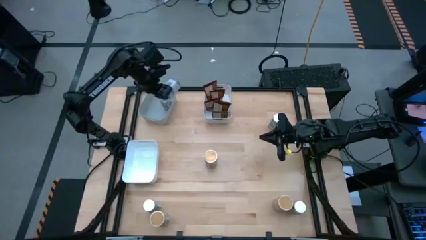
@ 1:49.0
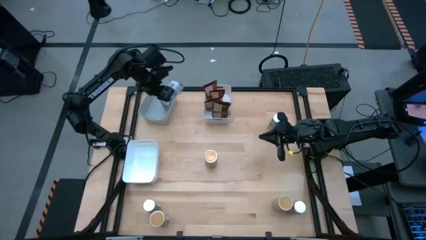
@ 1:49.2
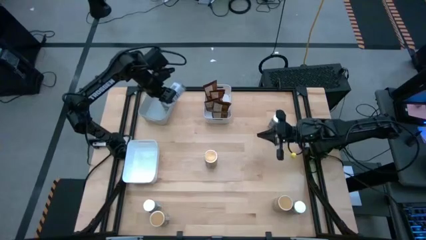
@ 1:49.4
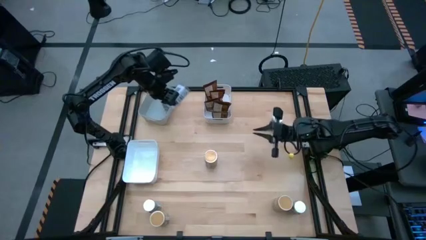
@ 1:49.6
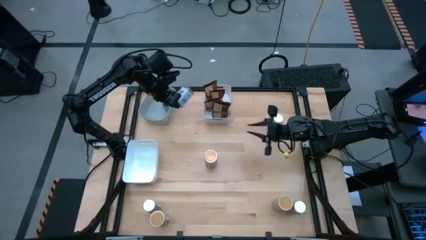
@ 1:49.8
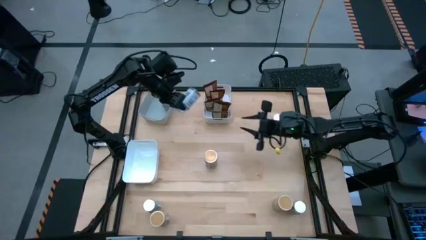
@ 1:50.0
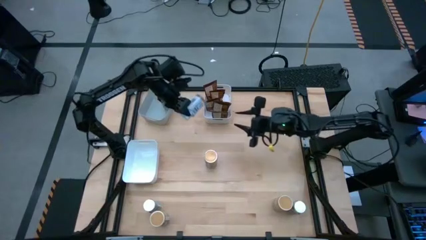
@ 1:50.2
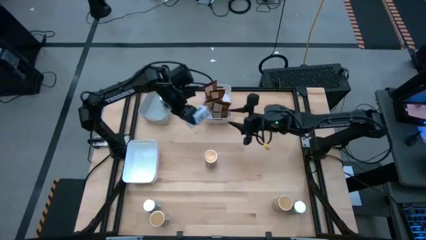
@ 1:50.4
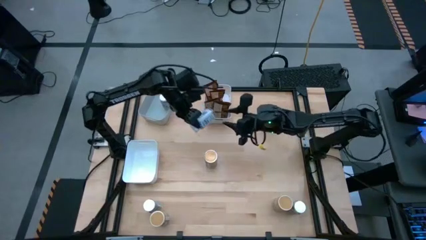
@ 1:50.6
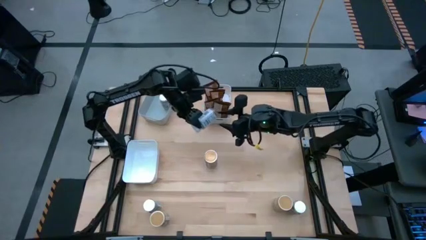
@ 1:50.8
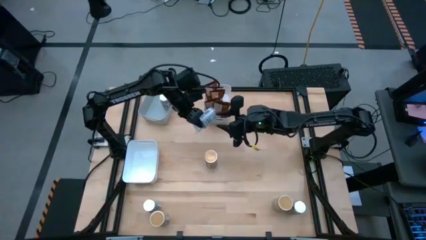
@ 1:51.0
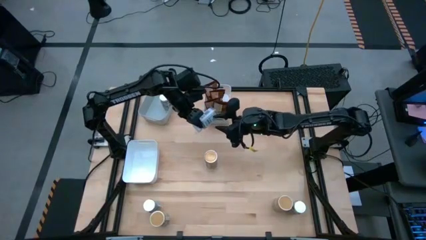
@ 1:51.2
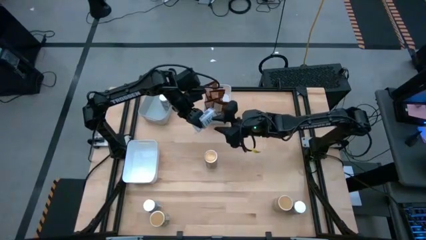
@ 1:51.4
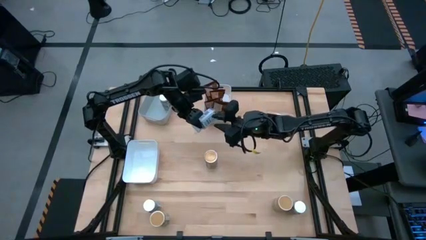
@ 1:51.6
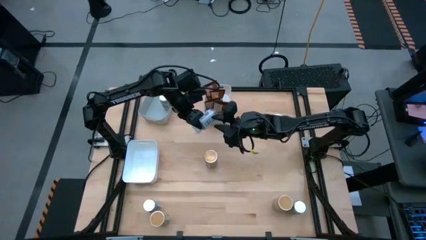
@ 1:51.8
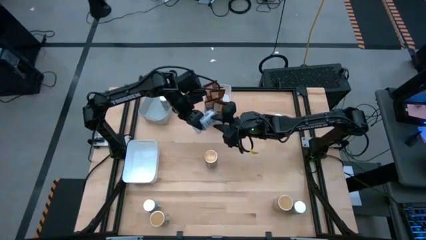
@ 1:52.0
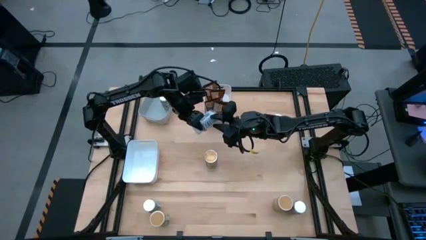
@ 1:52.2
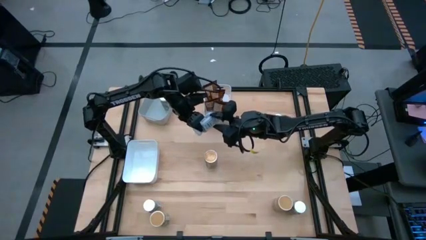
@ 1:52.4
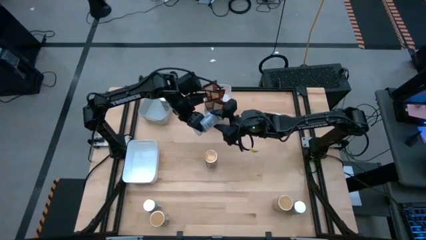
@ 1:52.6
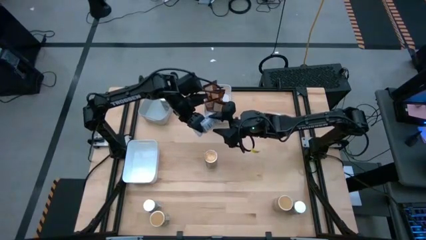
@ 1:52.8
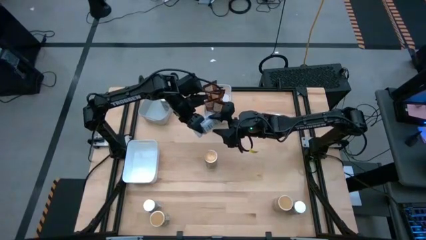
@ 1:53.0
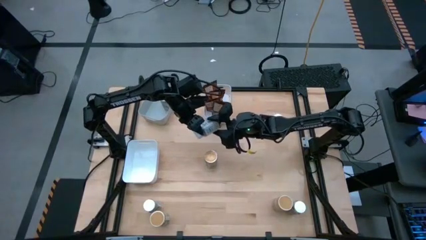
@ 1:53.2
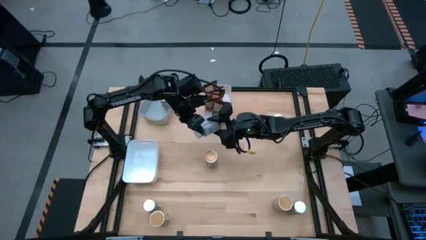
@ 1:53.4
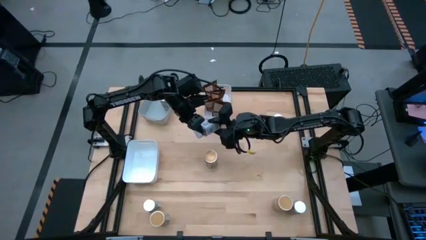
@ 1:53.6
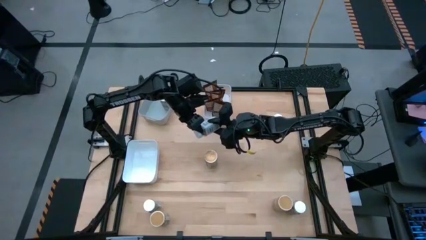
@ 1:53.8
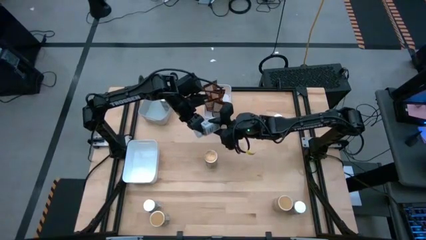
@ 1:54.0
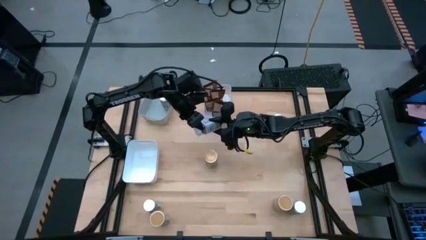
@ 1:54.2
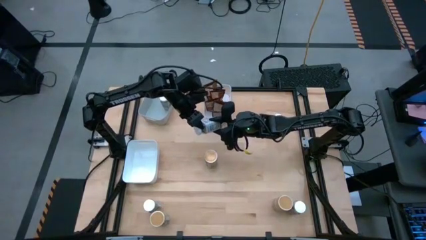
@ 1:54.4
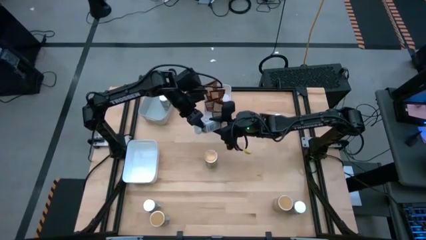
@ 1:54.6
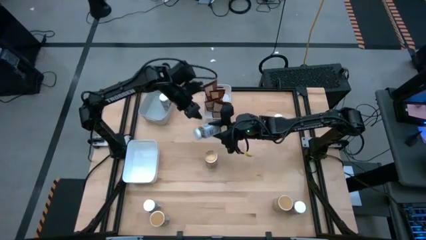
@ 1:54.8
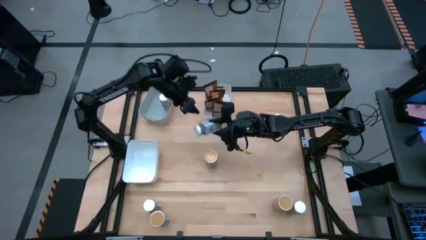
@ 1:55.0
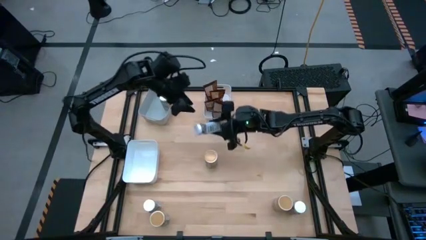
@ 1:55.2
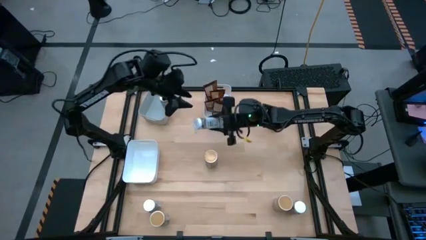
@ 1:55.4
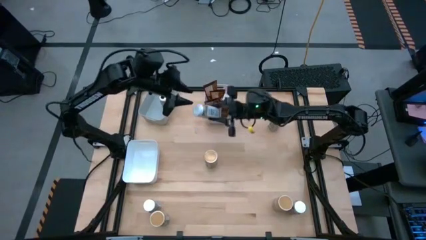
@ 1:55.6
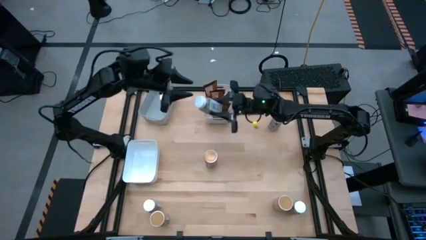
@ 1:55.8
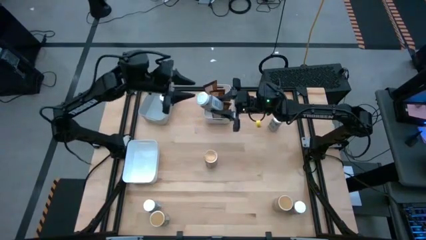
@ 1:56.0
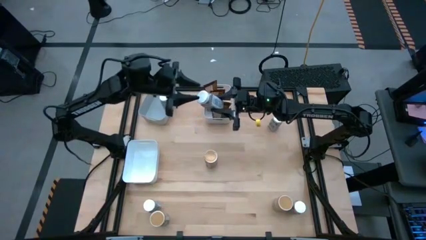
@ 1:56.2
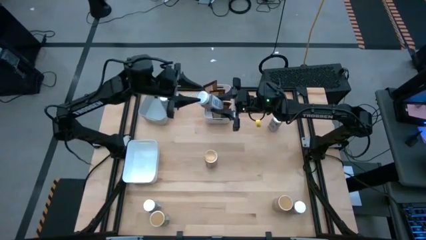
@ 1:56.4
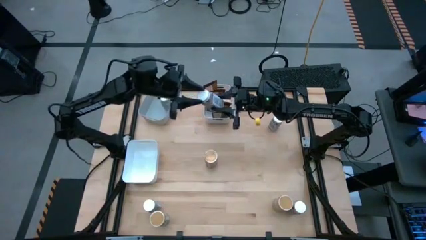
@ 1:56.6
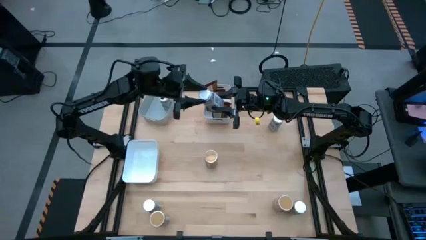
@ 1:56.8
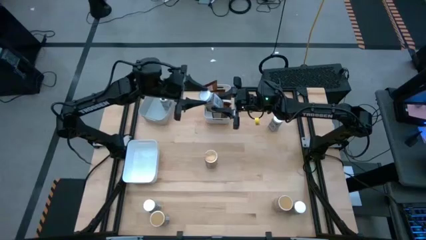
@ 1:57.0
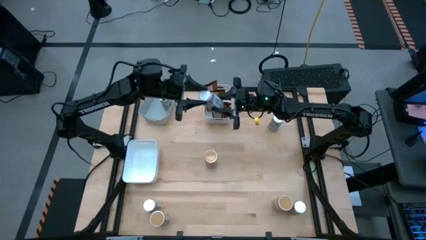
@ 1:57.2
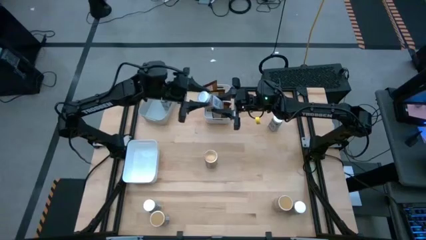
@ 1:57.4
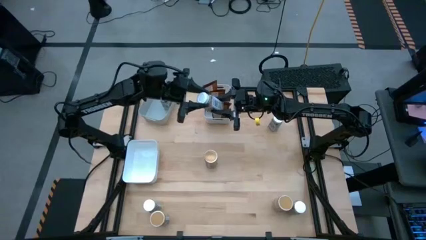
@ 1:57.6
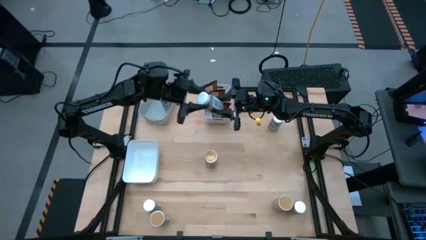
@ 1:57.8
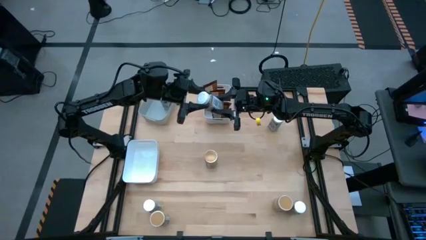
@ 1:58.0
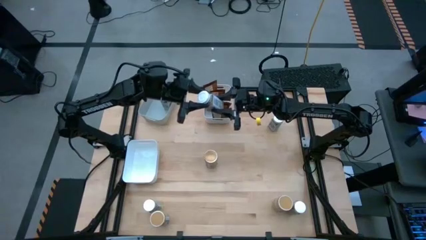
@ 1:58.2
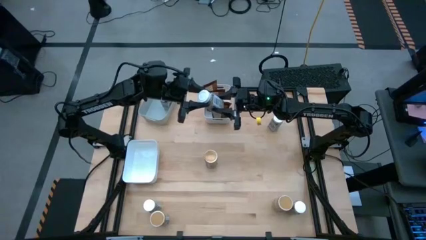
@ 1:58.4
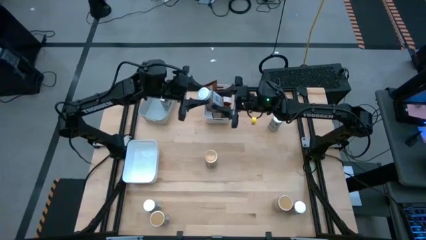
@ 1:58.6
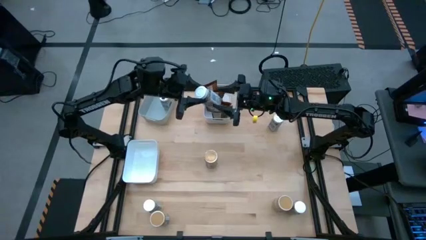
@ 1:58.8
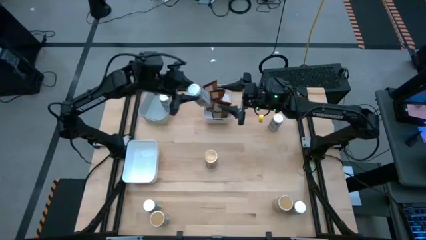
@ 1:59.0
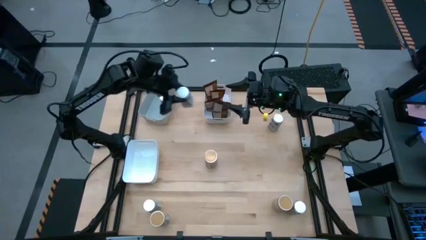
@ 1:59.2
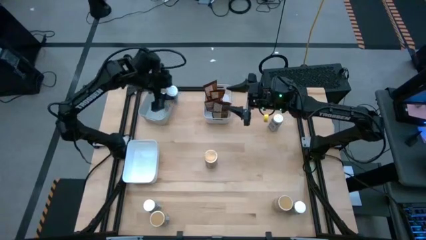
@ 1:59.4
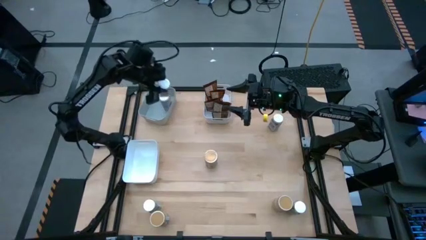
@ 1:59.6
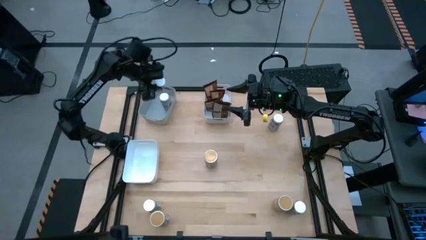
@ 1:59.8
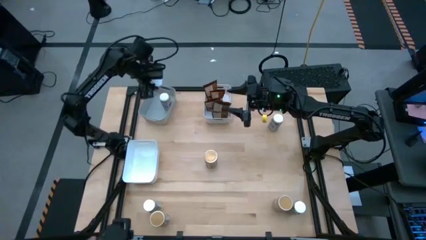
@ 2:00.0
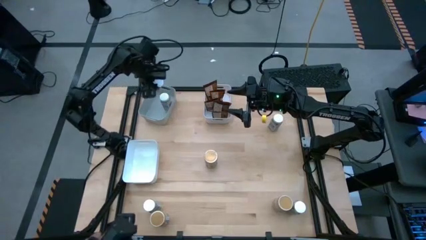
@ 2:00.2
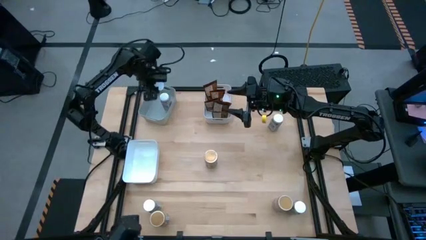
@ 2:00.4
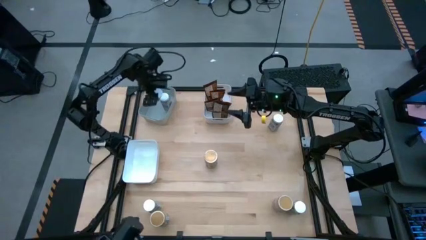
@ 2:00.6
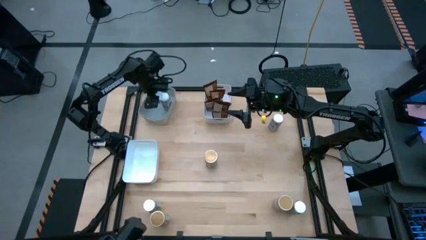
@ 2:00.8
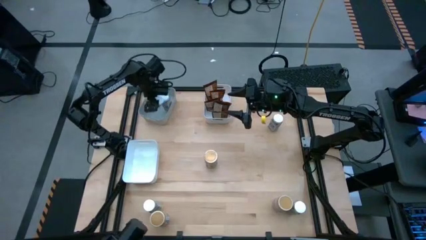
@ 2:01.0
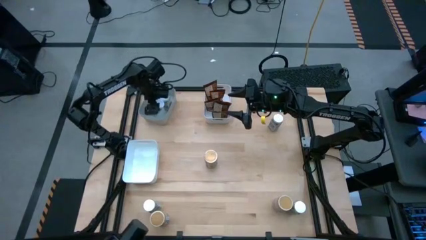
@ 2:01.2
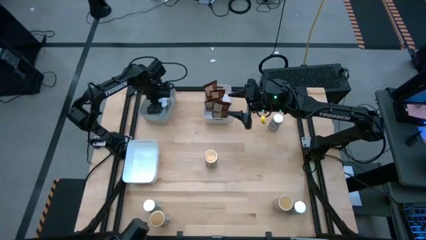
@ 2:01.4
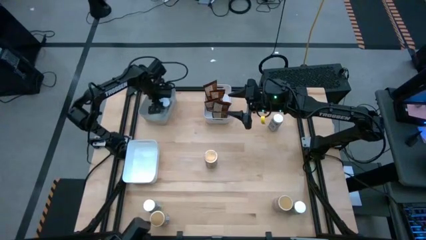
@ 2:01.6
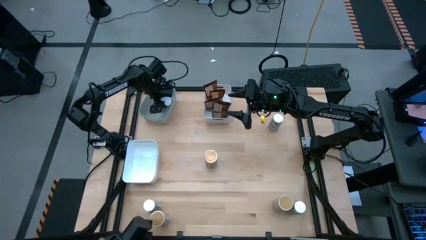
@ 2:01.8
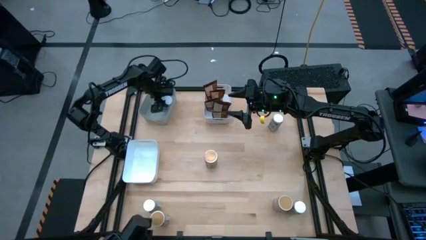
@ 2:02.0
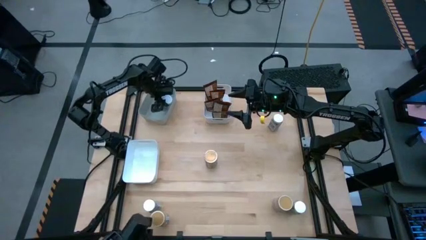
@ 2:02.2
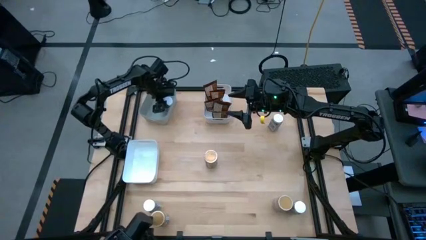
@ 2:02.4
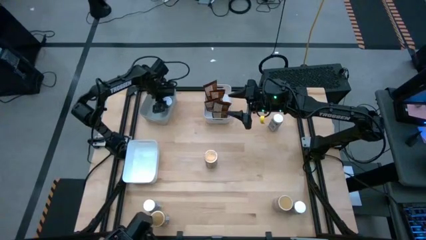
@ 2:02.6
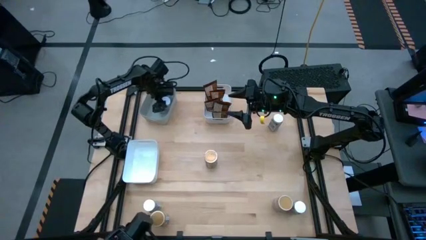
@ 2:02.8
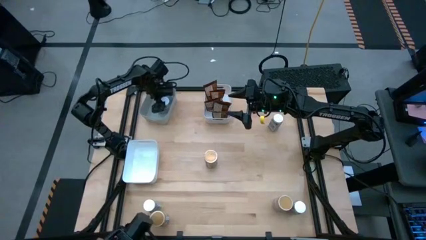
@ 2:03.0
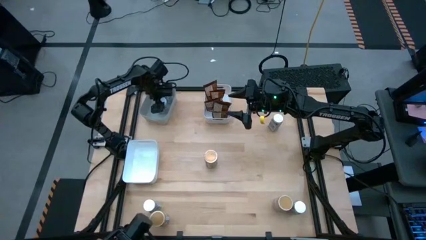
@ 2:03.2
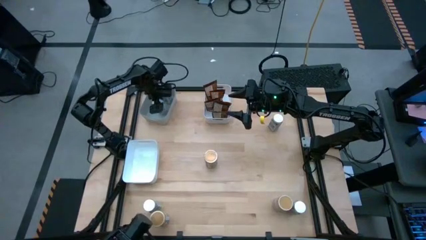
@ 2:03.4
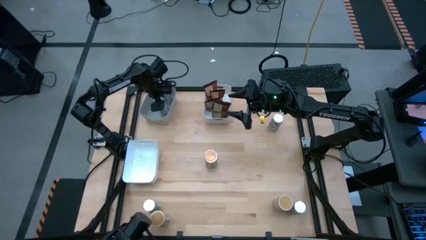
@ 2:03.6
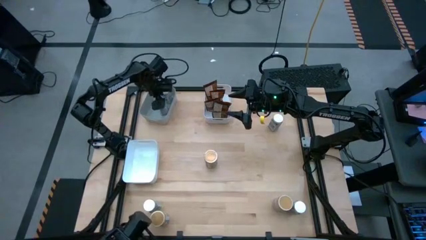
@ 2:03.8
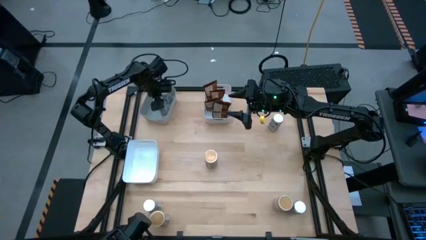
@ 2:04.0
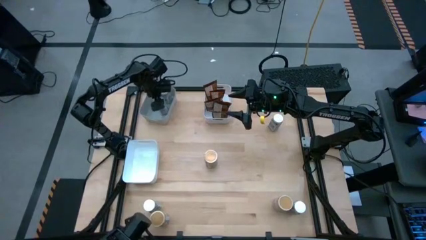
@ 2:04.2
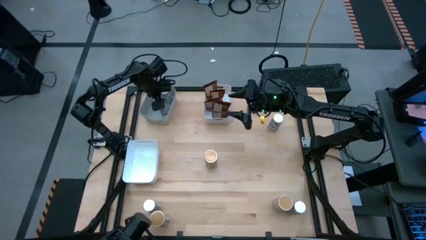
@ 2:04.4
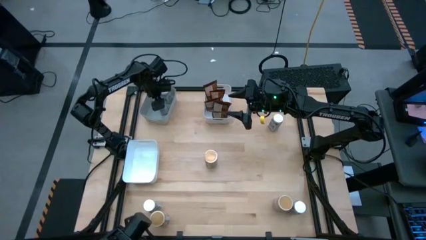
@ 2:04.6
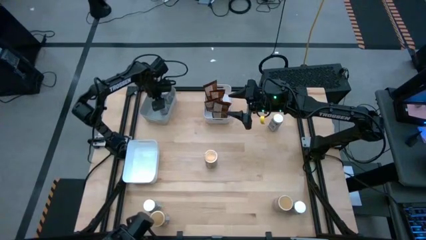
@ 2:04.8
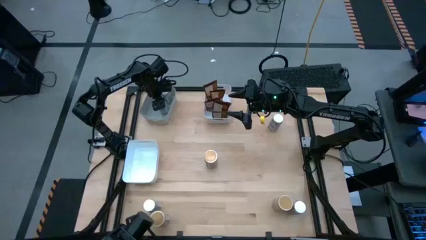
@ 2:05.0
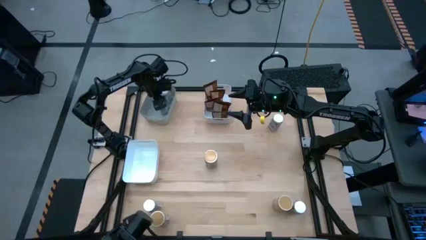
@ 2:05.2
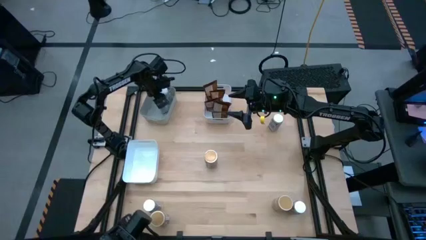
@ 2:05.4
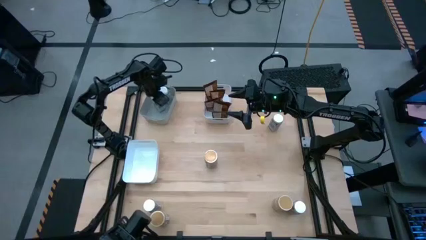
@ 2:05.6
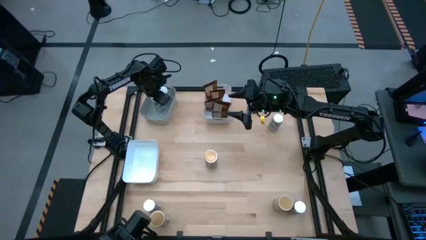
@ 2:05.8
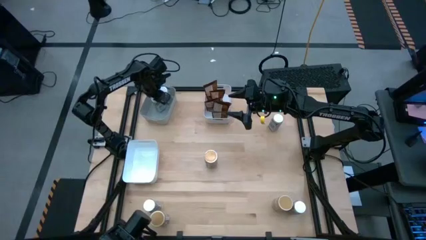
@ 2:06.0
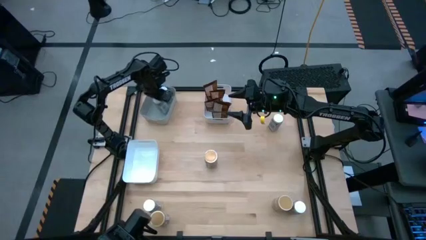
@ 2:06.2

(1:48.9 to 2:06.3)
Task: Sort spices by type
Put the white seasoning bottle into the gray bin
